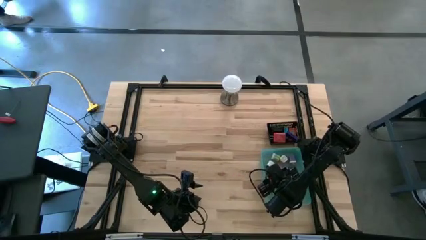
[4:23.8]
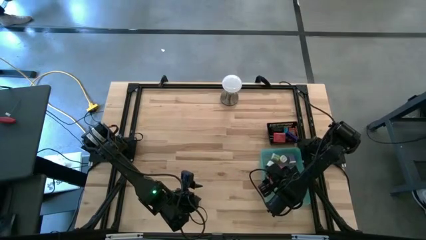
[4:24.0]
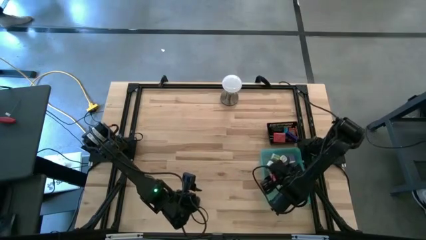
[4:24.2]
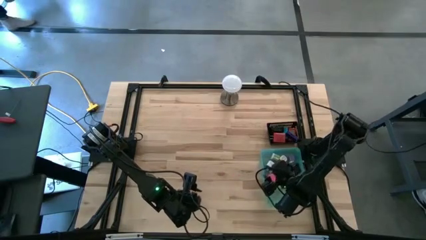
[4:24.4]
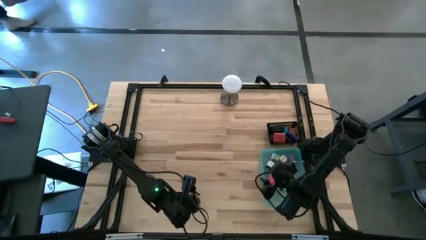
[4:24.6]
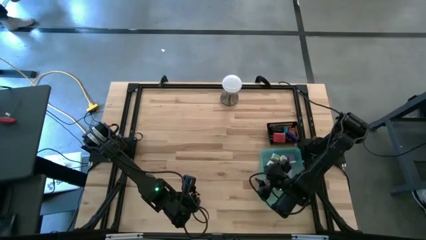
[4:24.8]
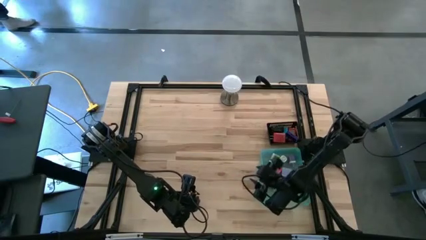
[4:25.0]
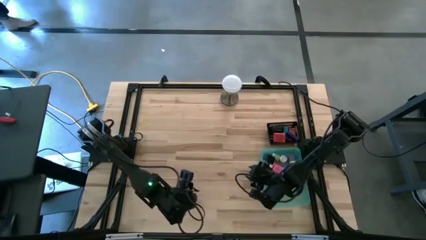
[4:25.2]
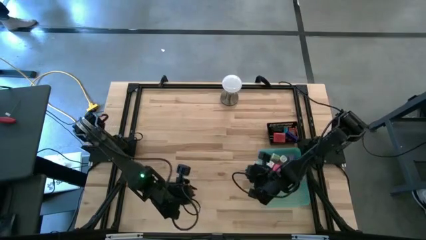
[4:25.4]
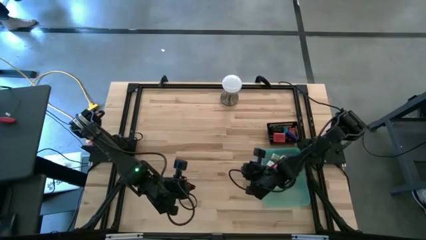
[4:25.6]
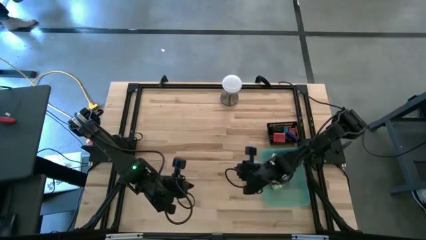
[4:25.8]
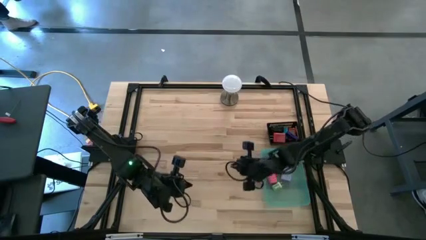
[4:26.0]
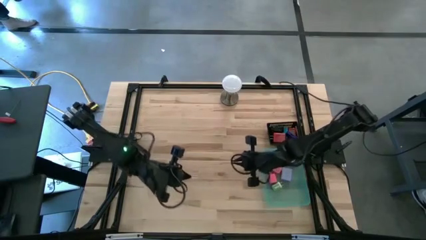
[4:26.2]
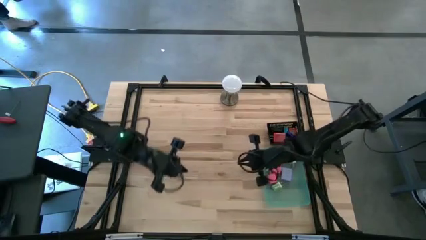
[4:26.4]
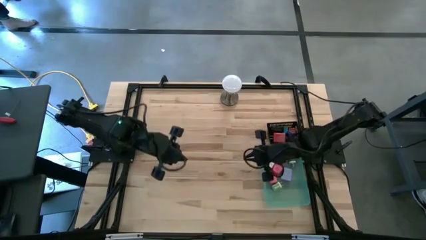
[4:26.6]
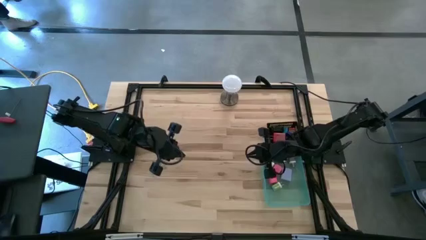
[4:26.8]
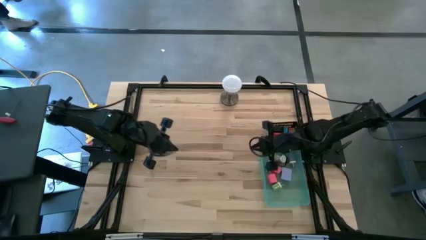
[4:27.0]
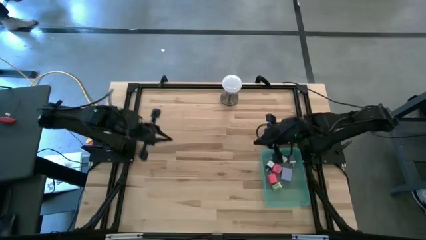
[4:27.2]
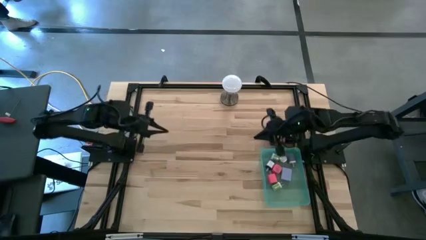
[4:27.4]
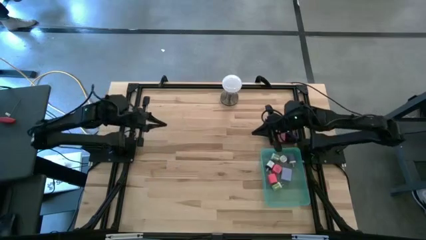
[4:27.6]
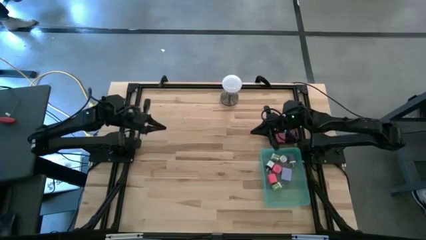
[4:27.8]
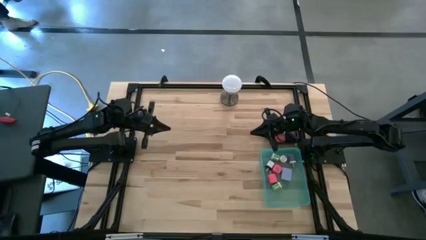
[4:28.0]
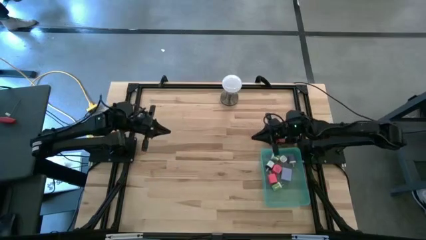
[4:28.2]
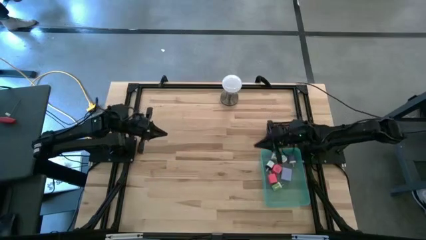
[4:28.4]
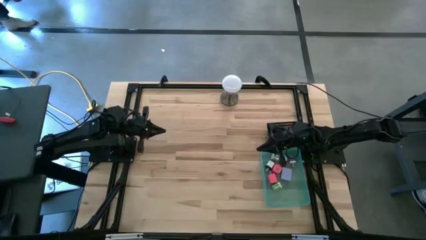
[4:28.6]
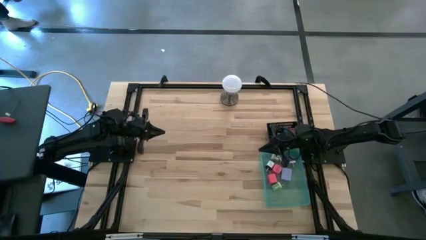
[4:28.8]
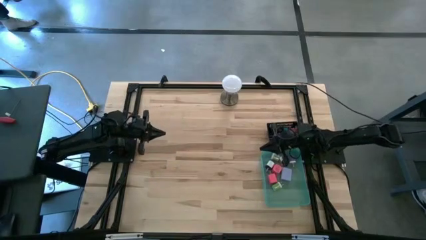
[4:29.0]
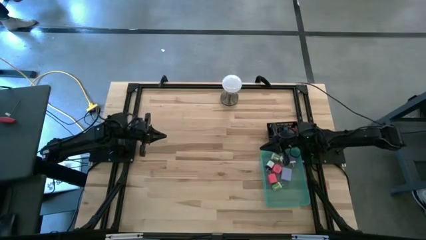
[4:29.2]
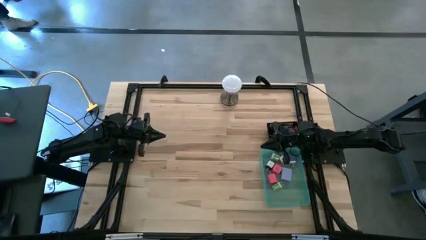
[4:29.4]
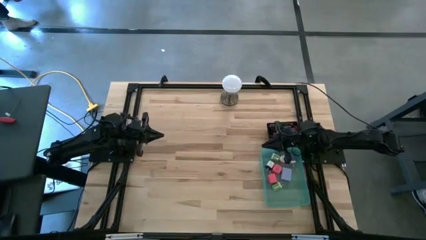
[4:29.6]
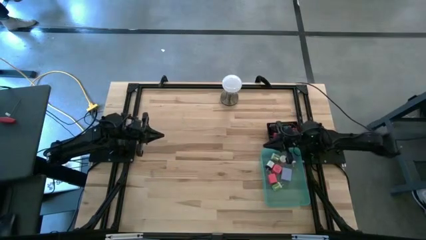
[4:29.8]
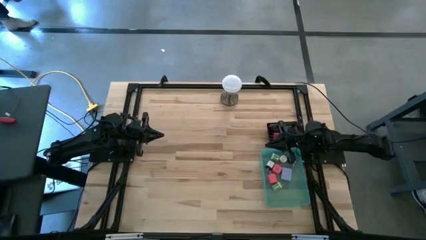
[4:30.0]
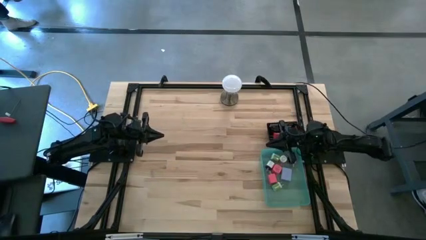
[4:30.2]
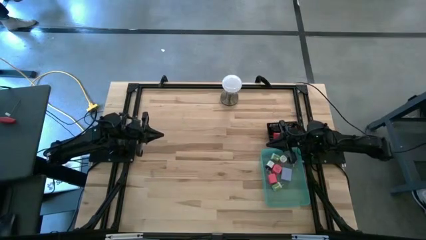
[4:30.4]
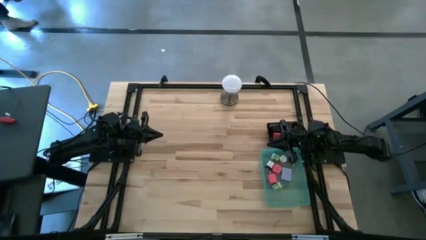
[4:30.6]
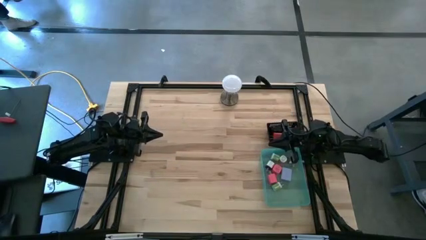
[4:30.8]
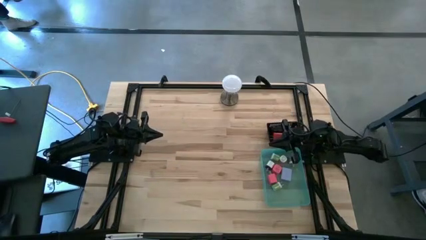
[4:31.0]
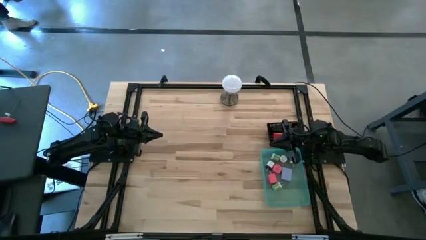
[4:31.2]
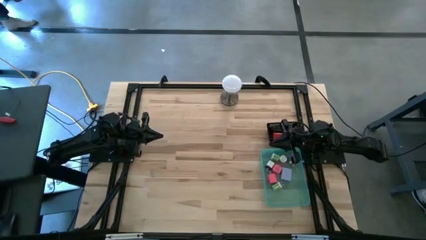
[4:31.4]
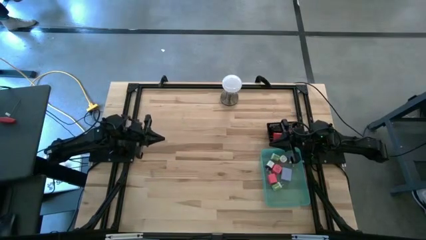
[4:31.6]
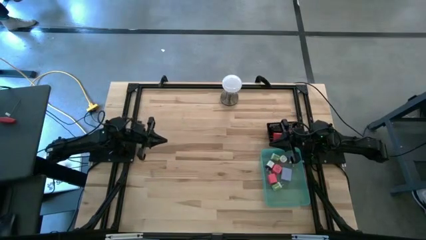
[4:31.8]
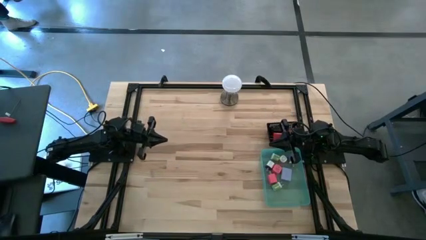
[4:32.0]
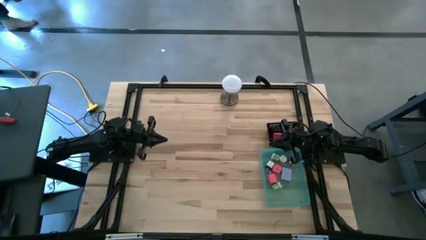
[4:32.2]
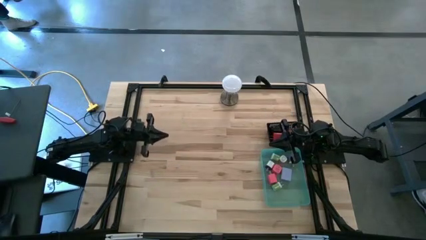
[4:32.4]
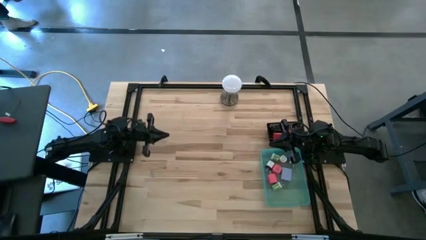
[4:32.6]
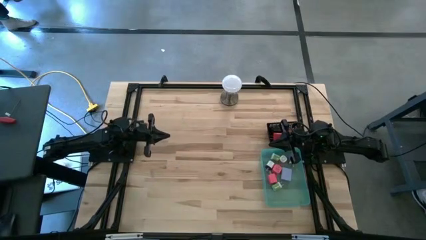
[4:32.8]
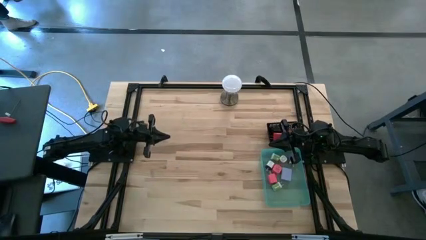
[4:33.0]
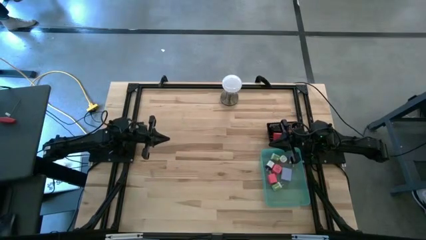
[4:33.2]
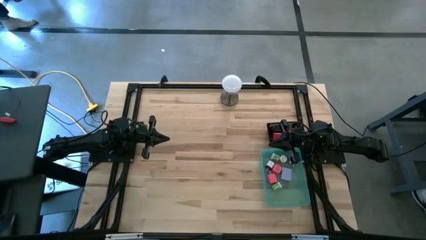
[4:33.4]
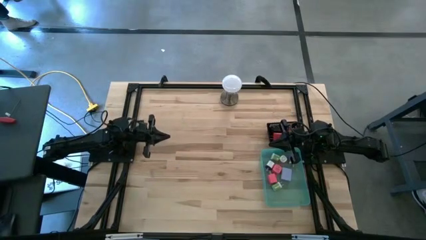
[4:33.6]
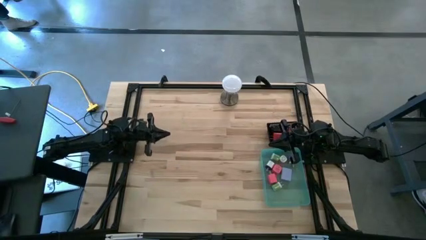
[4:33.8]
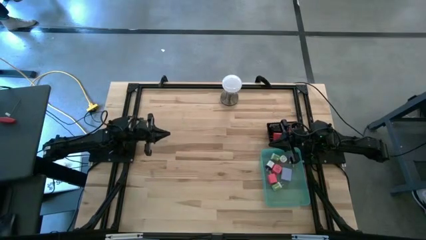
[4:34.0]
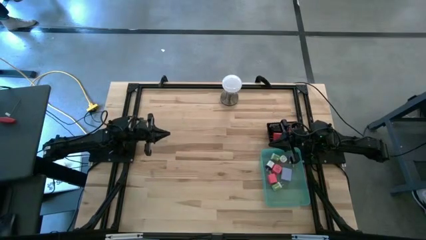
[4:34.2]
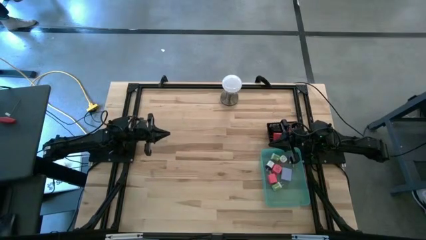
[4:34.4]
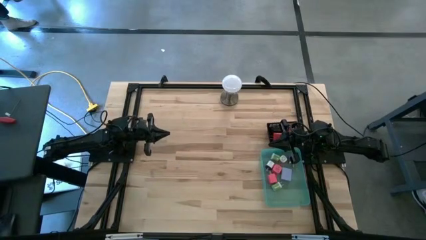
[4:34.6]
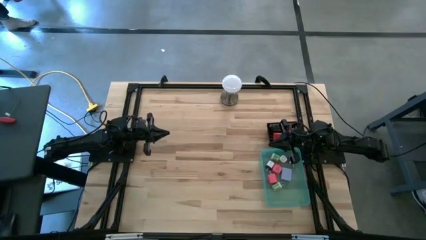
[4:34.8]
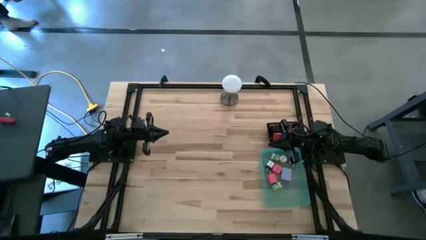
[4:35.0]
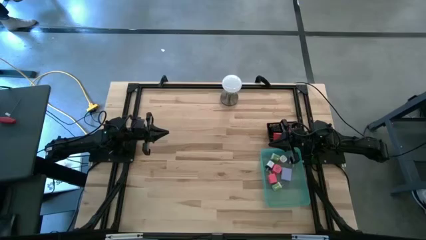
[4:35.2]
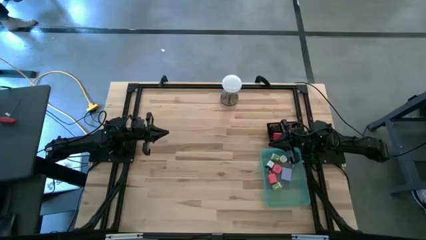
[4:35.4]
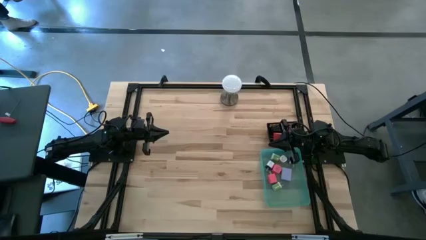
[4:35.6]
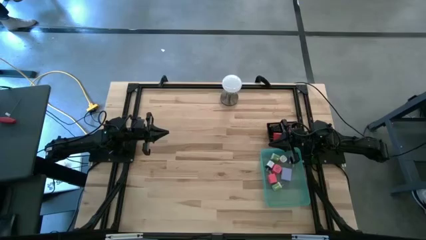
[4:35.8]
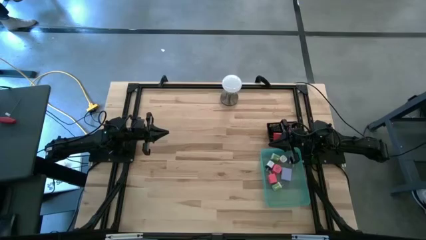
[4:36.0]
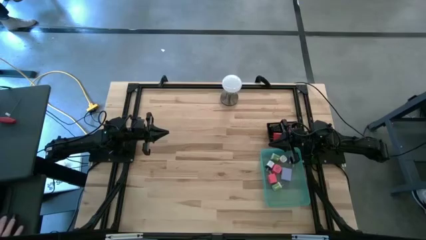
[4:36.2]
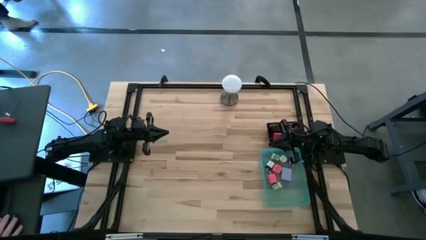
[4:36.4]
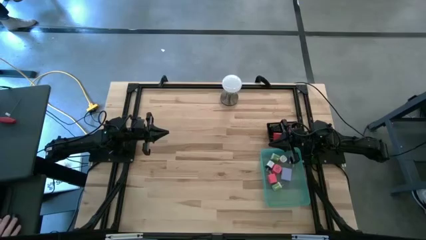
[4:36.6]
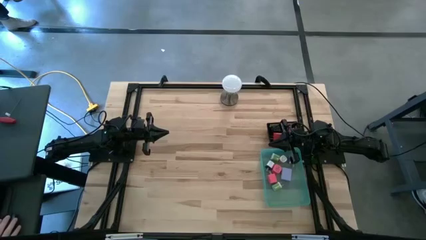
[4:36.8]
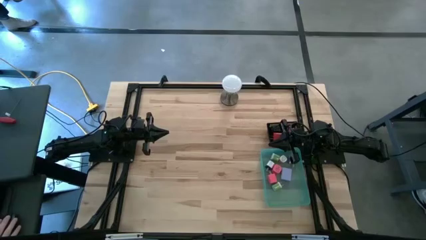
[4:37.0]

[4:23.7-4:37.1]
Task: Pick & Place Office items
Return to Home Position

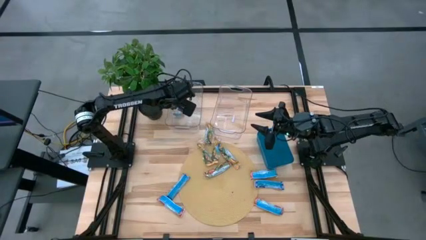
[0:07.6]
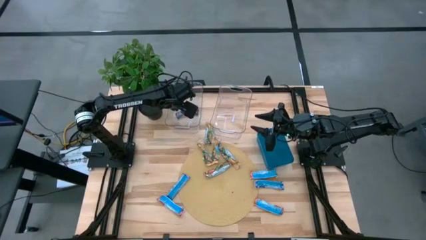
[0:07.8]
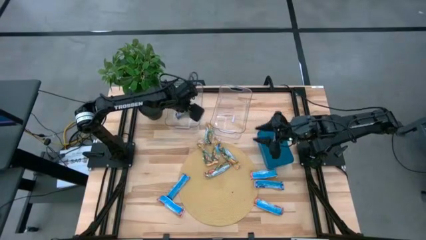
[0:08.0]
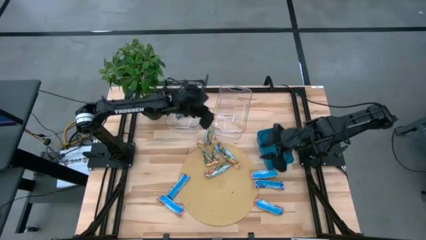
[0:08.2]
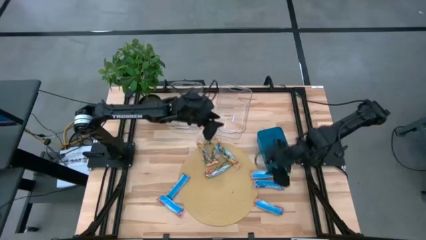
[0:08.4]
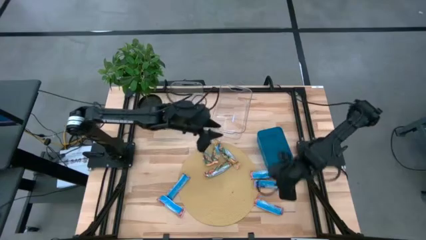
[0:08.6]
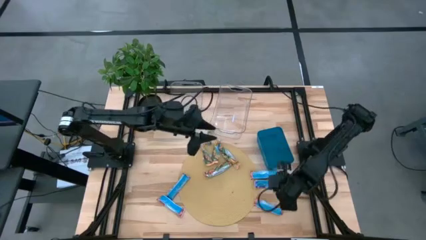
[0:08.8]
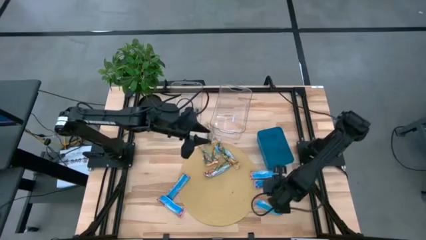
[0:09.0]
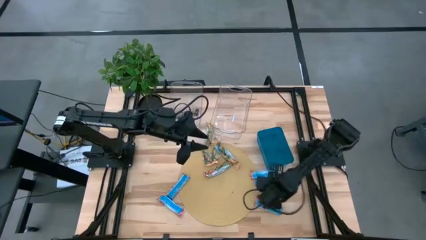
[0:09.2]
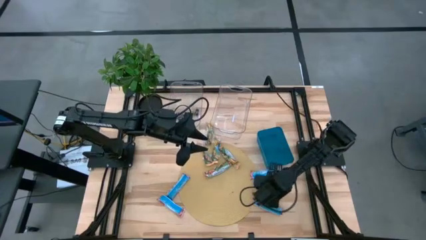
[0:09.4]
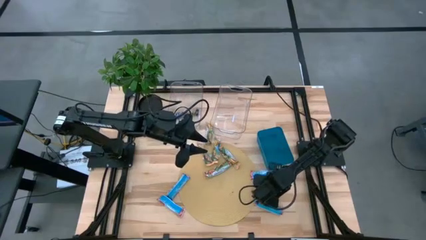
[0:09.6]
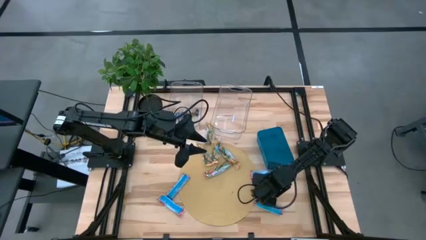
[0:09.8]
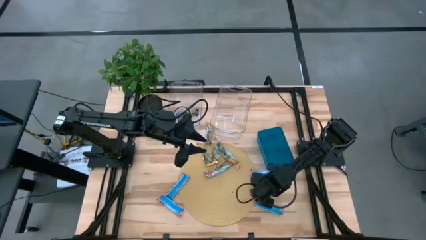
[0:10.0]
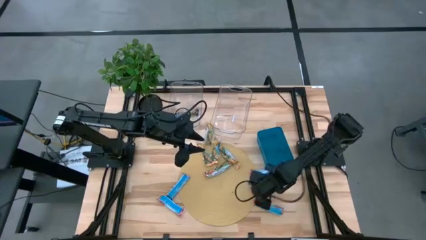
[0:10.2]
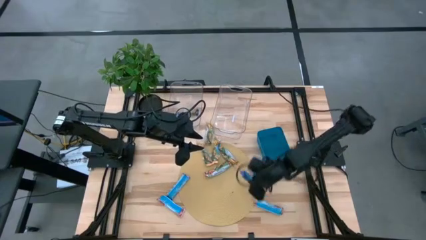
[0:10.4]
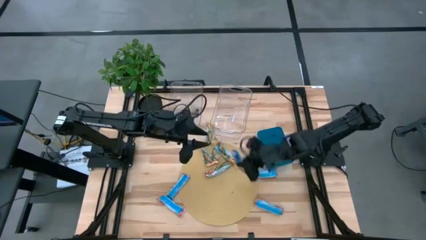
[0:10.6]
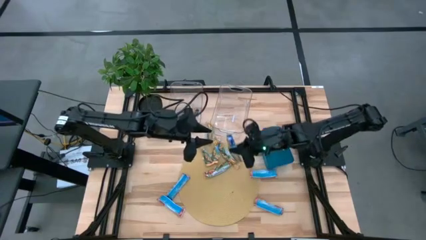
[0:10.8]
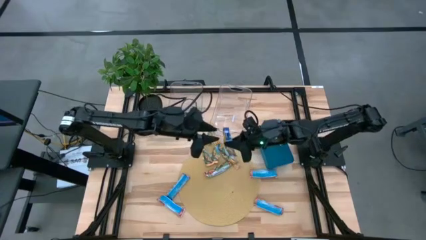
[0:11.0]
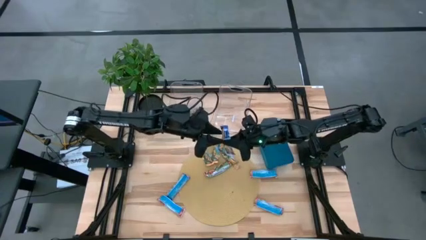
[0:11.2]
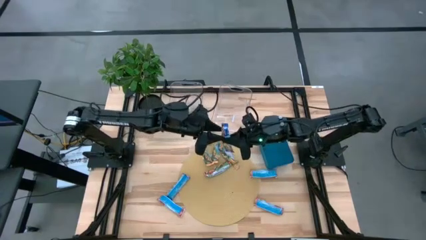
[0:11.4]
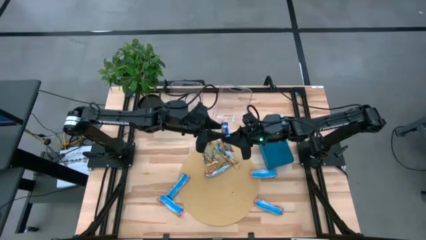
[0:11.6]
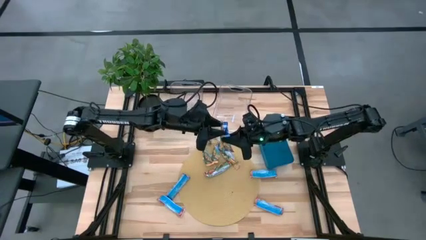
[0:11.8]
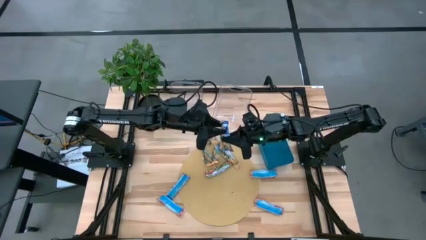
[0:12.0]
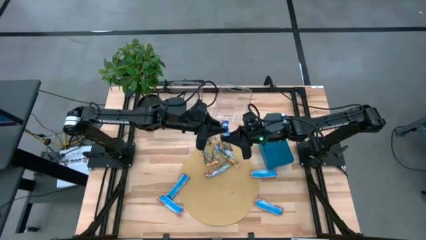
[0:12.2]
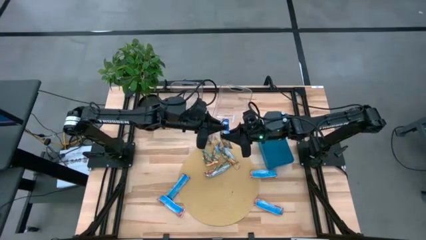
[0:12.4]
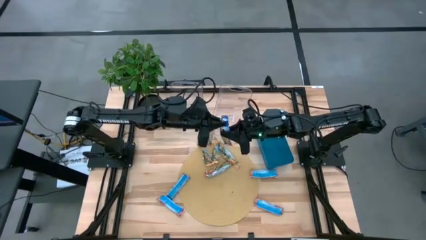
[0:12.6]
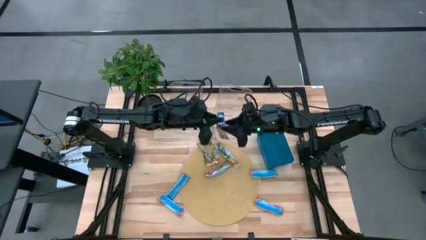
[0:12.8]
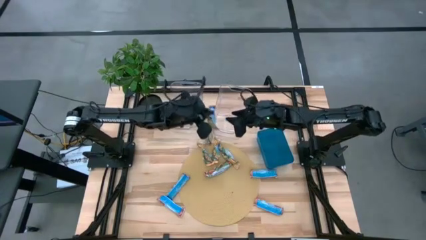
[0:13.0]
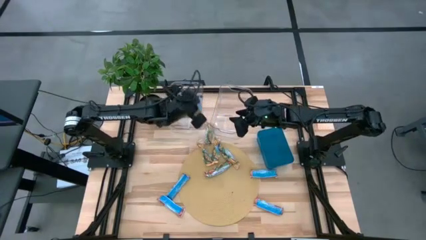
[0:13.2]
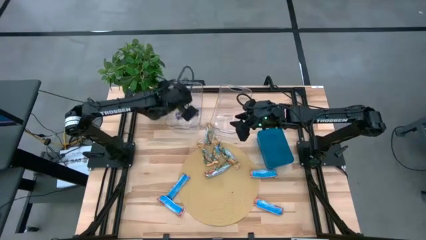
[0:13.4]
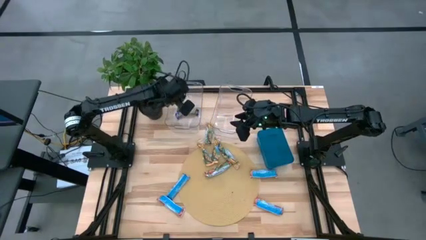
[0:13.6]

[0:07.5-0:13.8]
Task: Pick and place Granola Bars by type
Put the right blue granola bar into the left transparent bin
